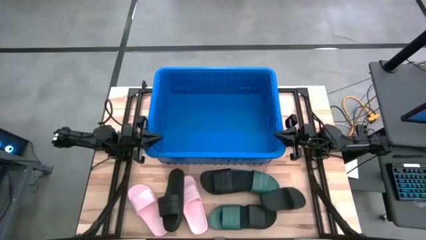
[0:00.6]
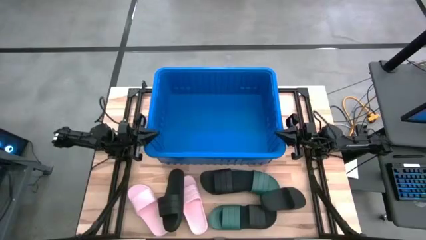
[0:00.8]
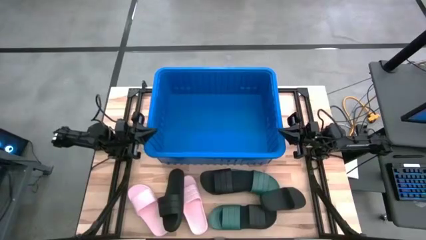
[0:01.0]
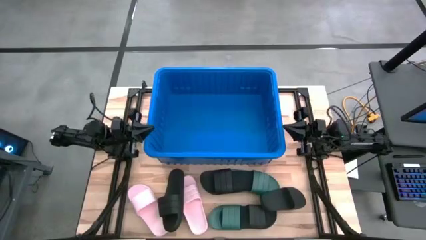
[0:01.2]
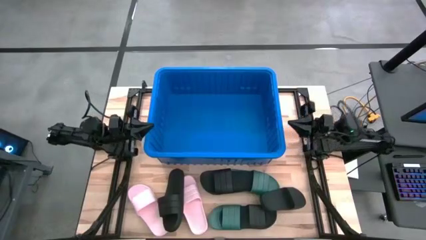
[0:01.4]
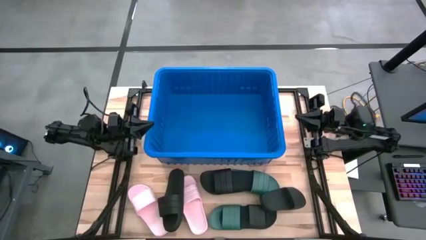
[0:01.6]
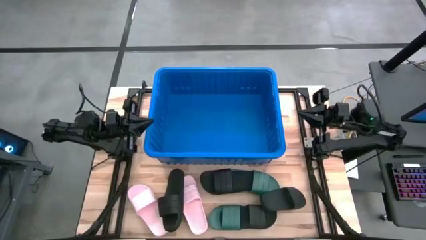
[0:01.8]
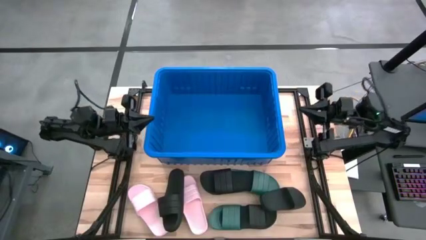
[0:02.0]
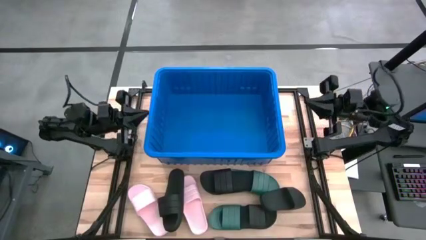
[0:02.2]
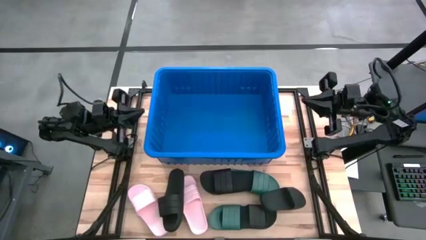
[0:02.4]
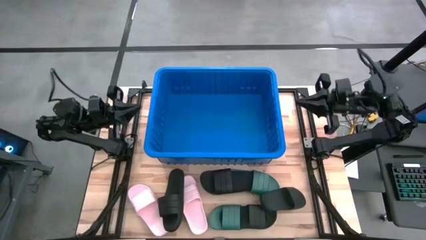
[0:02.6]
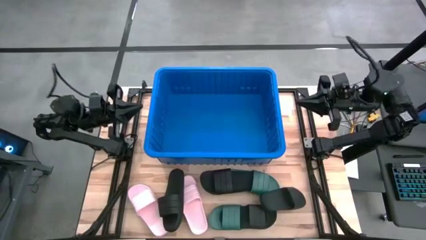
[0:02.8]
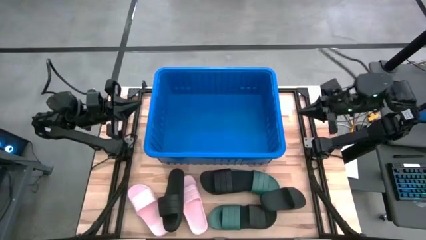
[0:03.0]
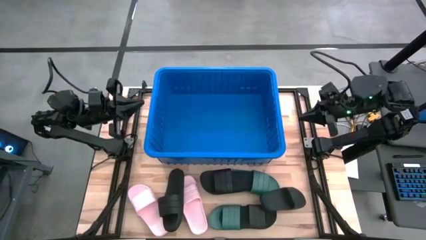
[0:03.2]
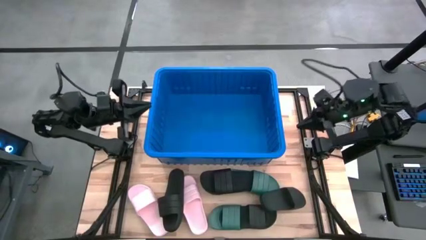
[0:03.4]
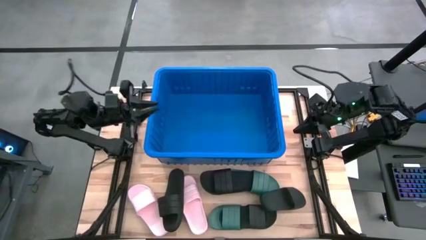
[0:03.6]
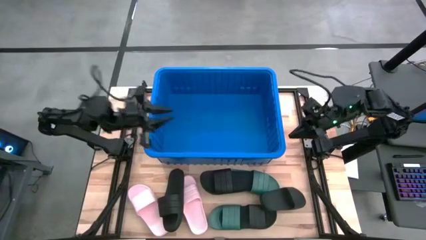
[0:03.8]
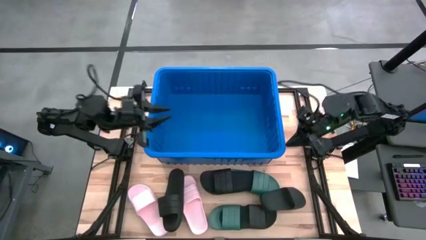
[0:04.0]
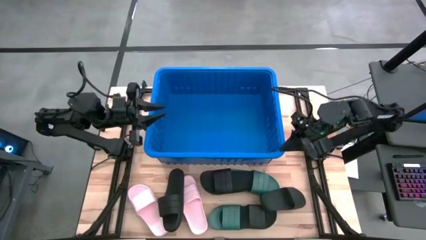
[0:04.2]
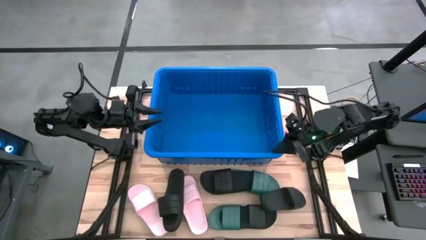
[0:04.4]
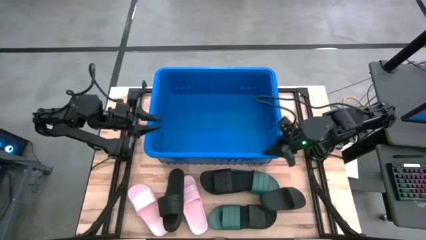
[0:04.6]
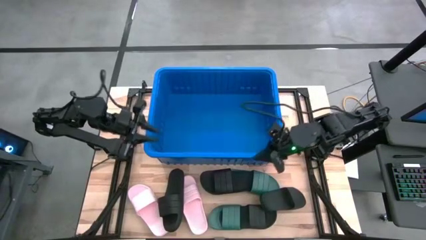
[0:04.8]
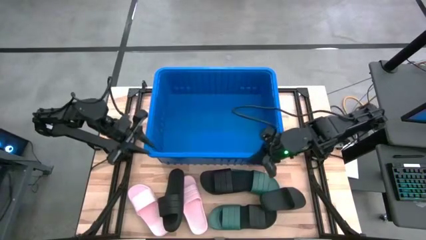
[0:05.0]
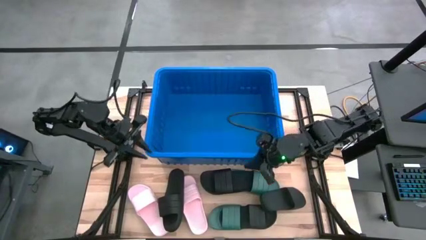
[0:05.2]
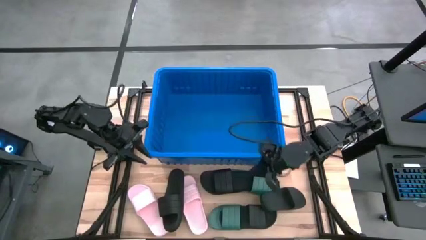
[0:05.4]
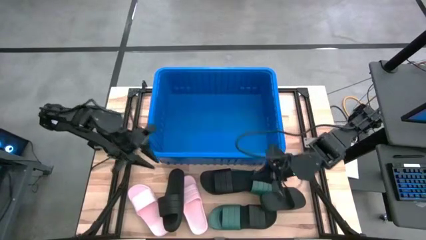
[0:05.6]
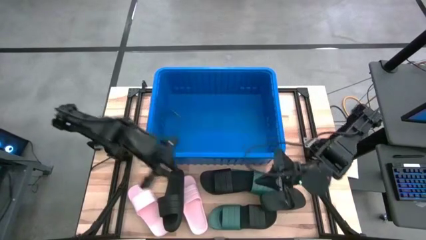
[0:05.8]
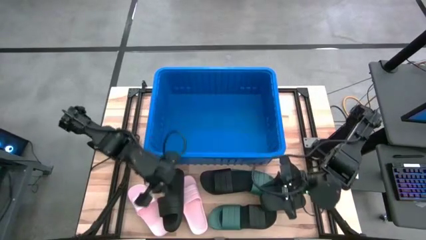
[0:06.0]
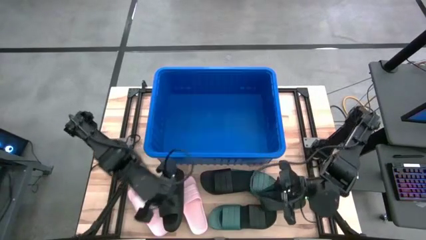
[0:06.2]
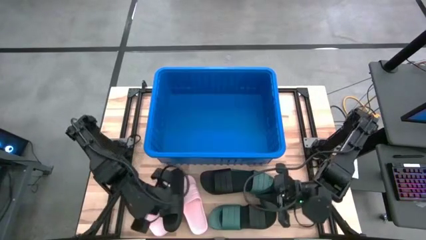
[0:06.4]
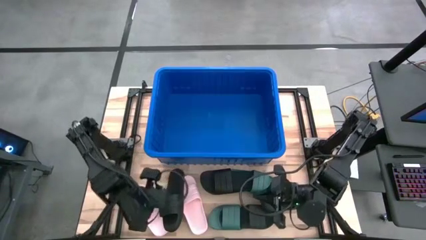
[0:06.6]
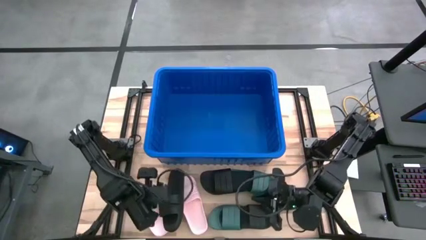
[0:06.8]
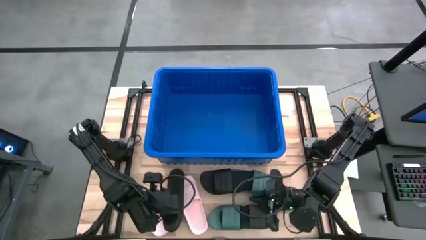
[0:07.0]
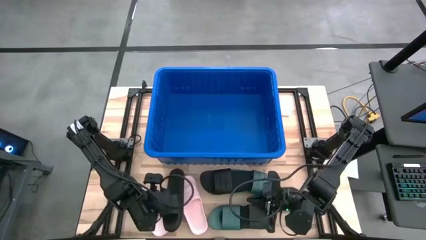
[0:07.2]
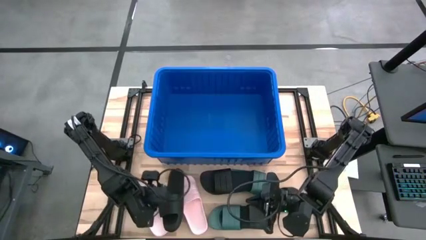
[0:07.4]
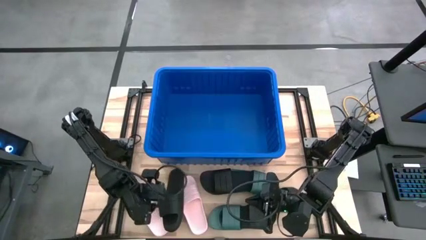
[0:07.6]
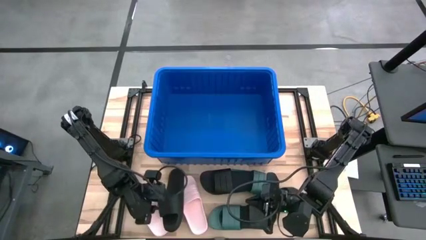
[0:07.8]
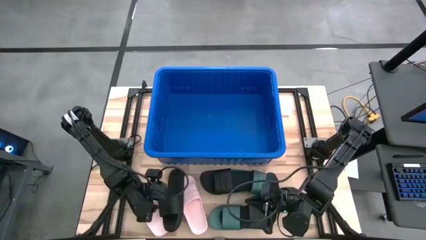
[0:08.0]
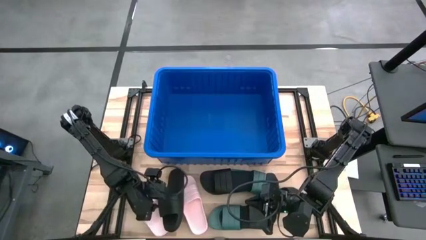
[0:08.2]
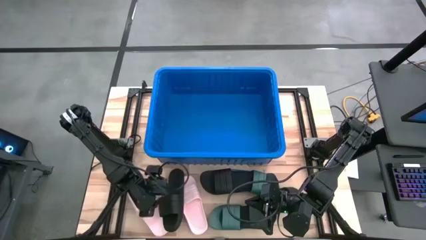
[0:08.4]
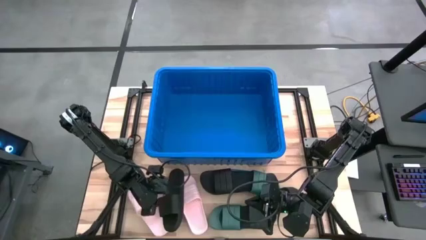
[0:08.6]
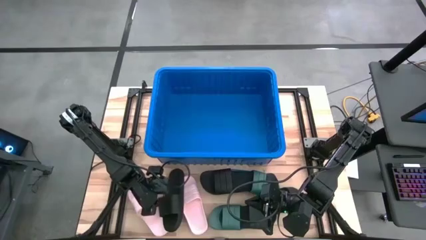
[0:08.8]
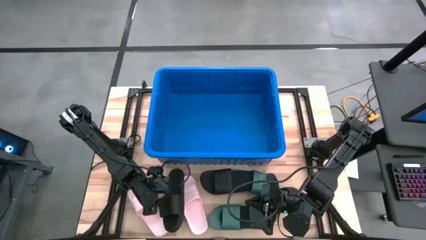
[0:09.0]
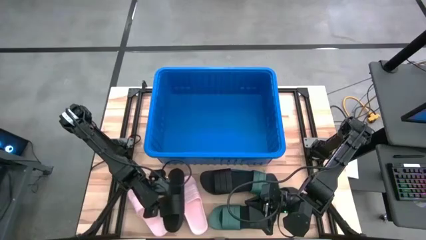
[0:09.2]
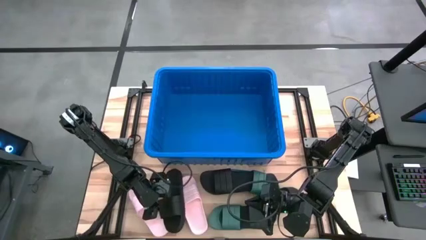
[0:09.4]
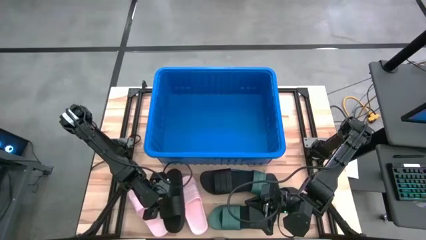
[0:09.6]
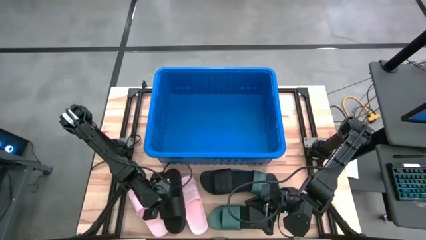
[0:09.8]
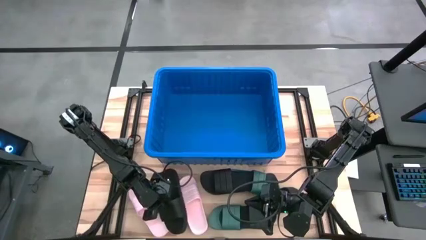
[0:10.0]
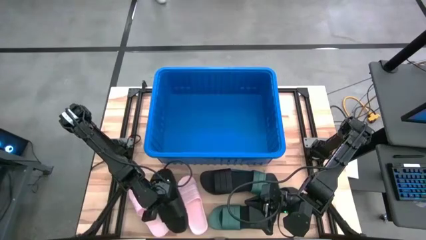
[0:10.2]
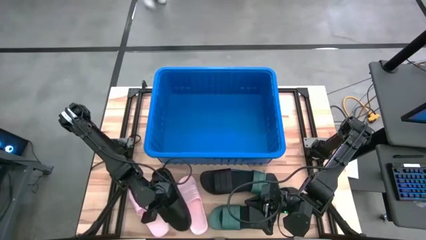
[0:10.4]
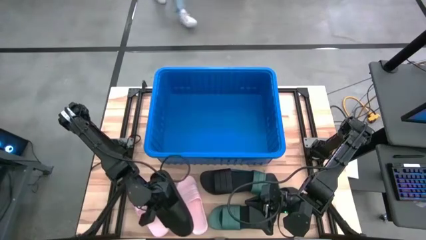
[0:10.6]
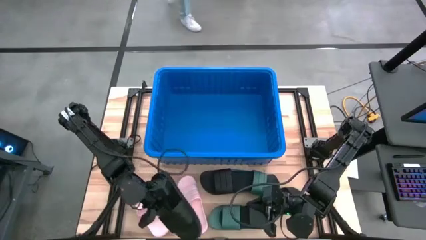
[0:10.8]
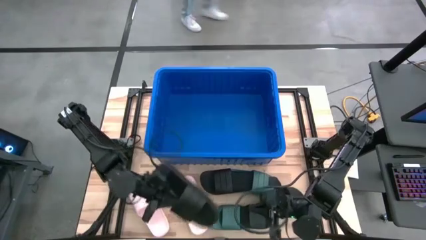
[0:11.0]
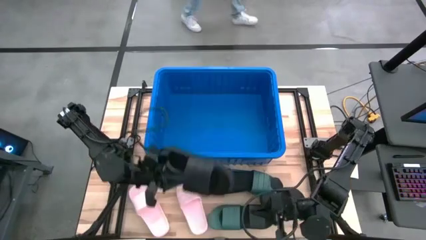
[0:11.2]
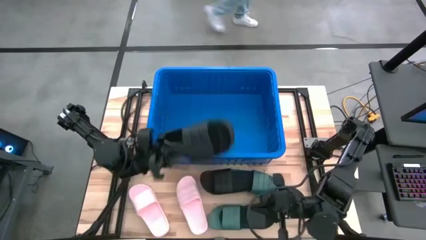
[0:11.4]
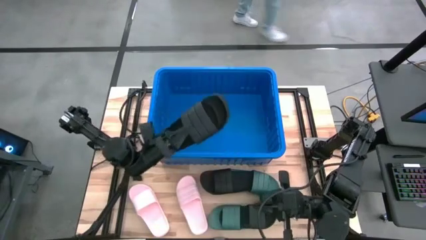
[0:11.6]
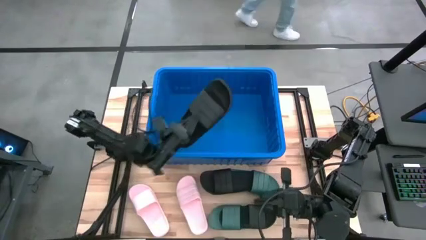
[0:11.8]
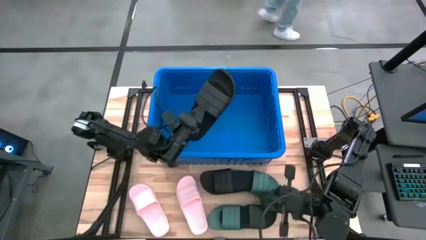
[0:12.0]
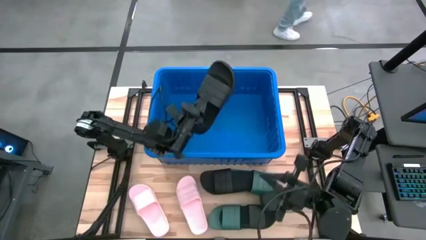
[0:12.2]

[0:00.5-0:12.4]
Task: Pick and place slides into bin
Put the black slipper into the blue bin
